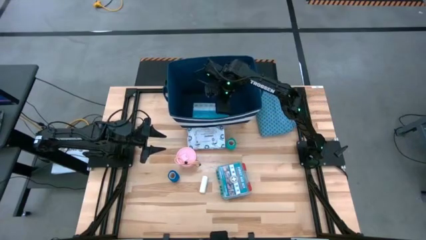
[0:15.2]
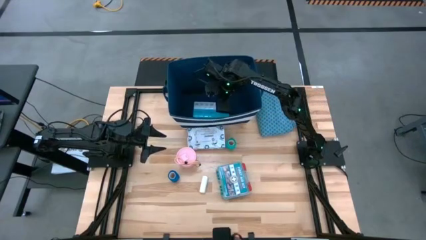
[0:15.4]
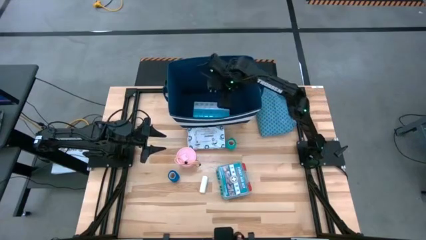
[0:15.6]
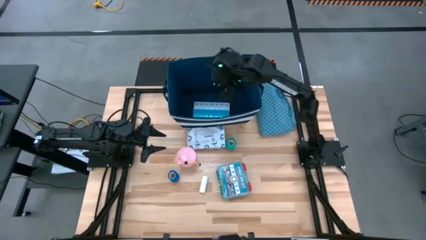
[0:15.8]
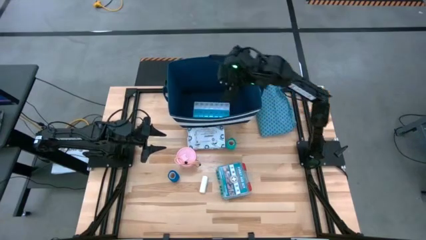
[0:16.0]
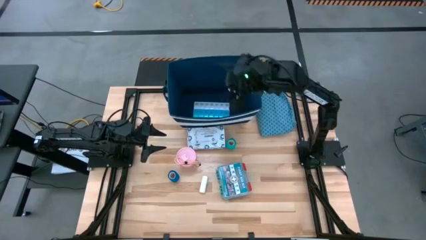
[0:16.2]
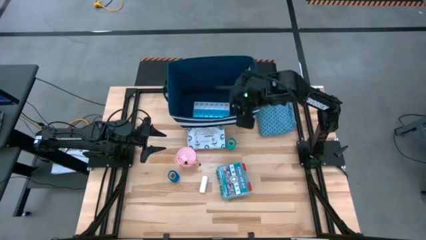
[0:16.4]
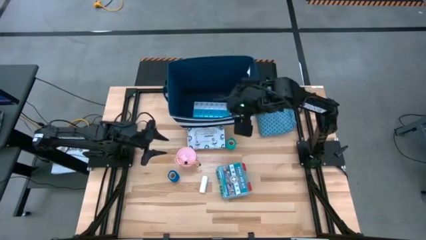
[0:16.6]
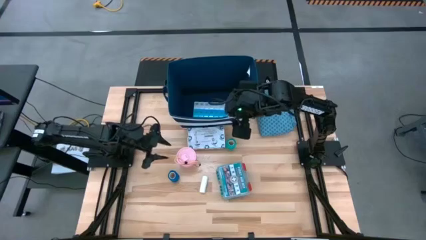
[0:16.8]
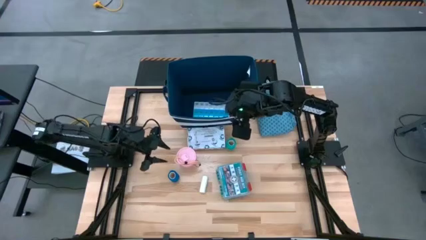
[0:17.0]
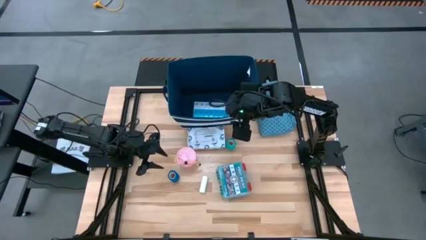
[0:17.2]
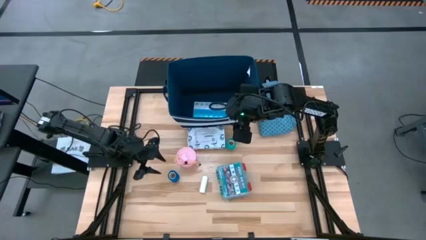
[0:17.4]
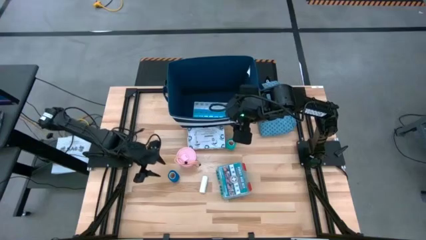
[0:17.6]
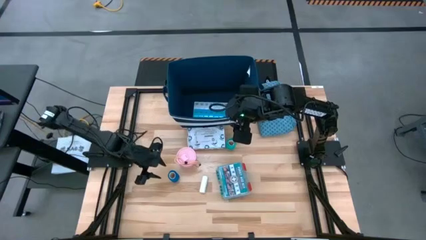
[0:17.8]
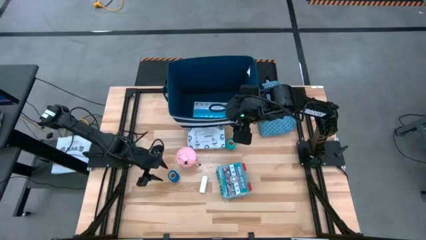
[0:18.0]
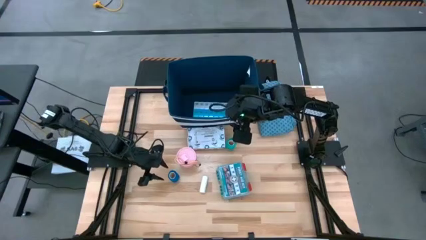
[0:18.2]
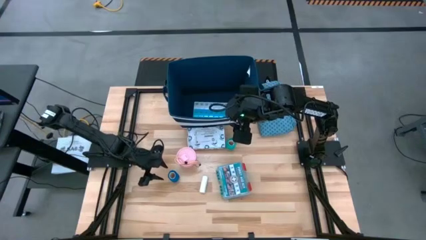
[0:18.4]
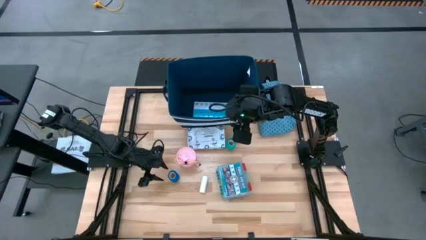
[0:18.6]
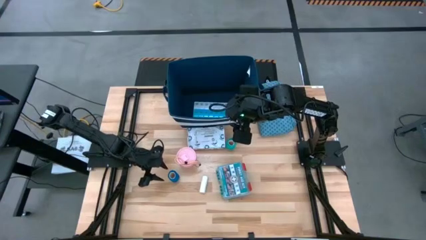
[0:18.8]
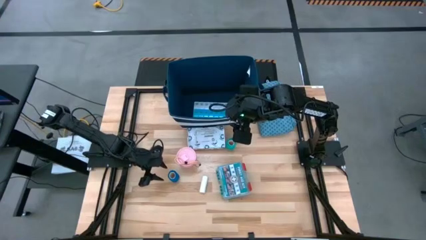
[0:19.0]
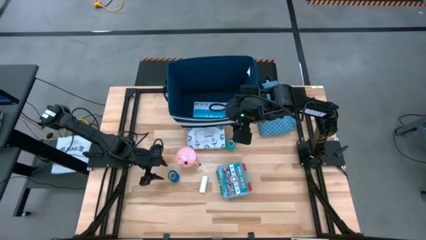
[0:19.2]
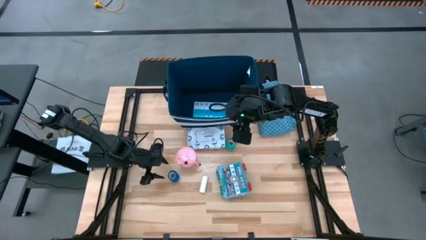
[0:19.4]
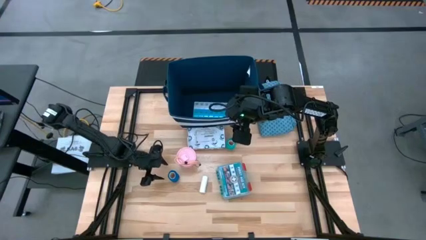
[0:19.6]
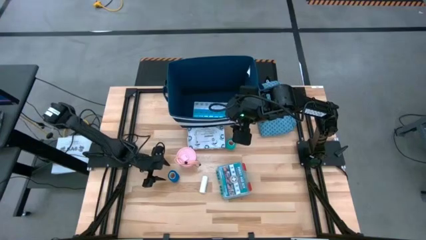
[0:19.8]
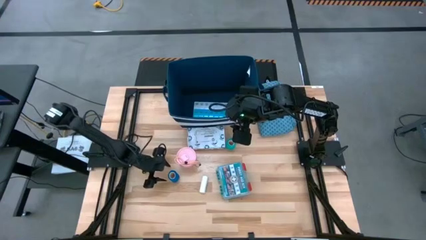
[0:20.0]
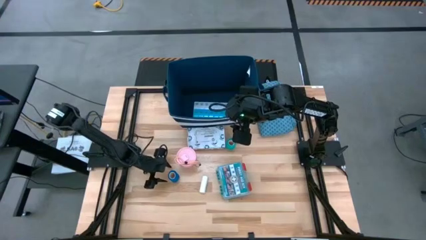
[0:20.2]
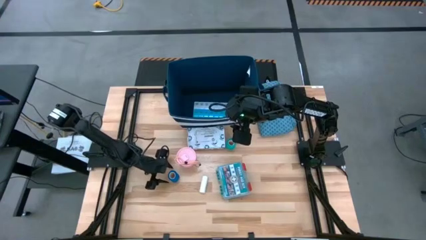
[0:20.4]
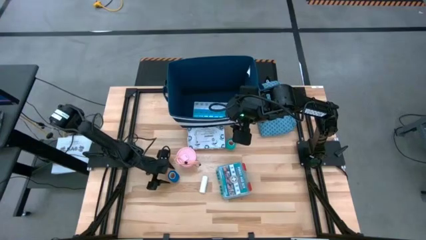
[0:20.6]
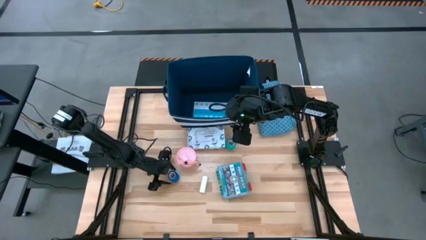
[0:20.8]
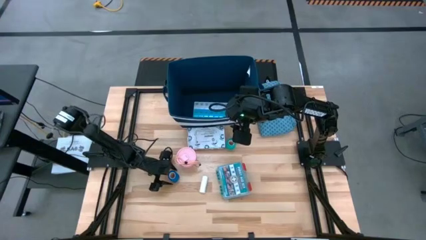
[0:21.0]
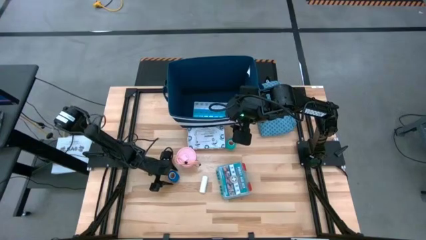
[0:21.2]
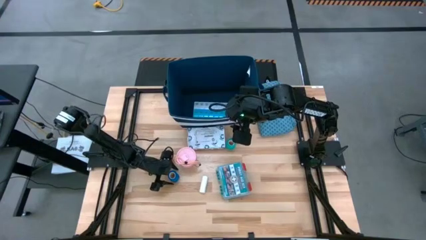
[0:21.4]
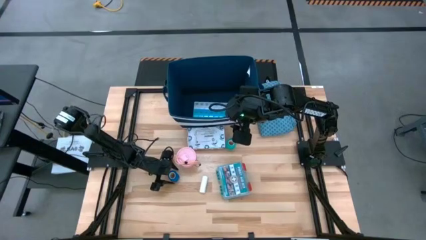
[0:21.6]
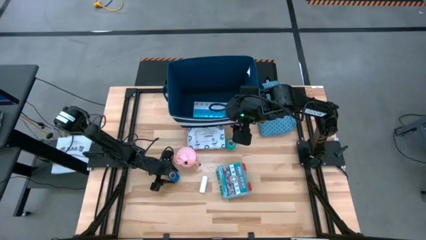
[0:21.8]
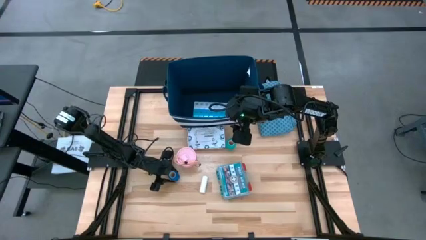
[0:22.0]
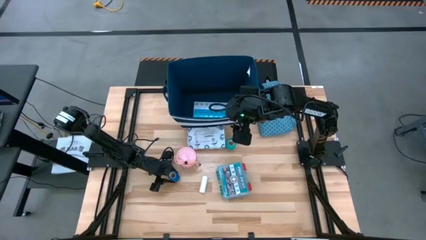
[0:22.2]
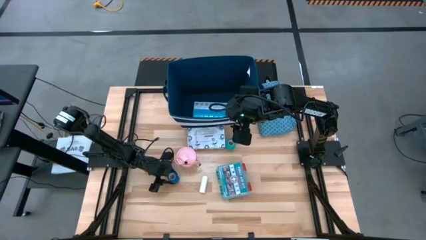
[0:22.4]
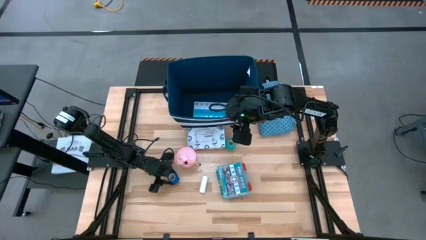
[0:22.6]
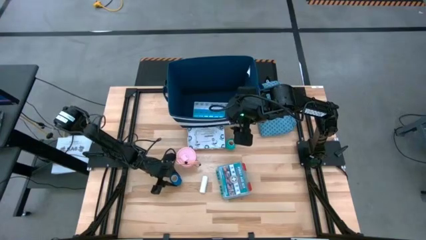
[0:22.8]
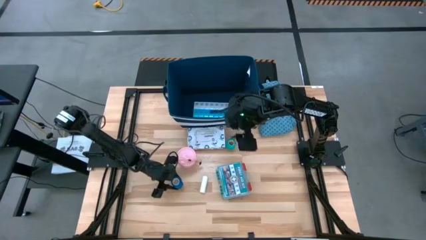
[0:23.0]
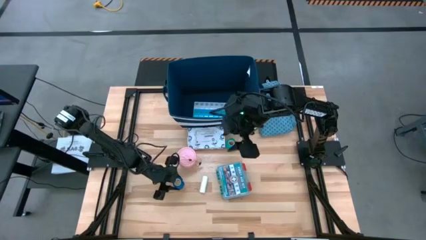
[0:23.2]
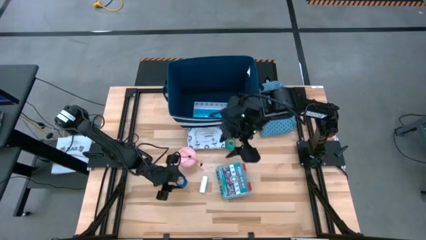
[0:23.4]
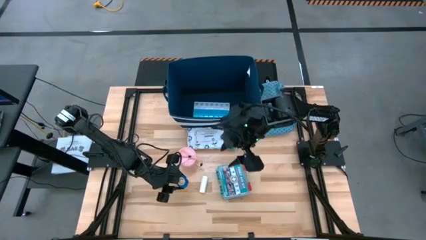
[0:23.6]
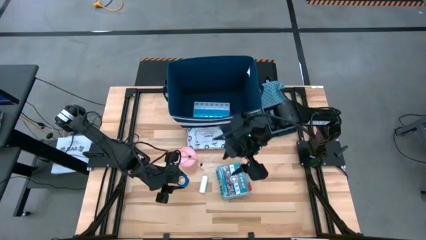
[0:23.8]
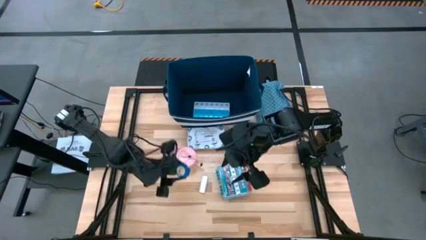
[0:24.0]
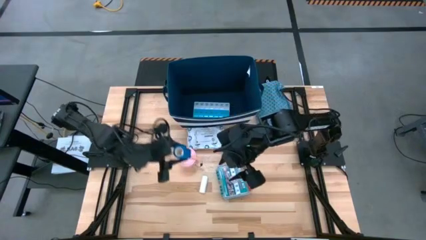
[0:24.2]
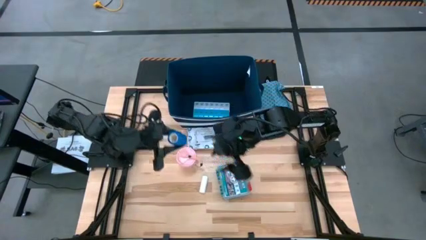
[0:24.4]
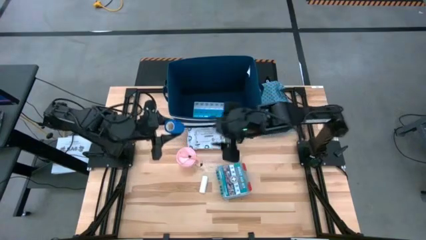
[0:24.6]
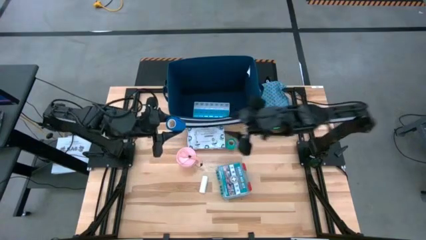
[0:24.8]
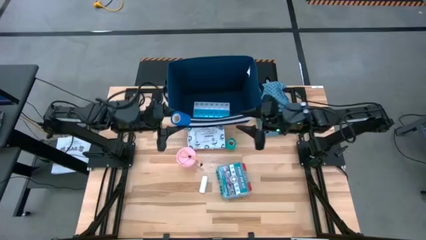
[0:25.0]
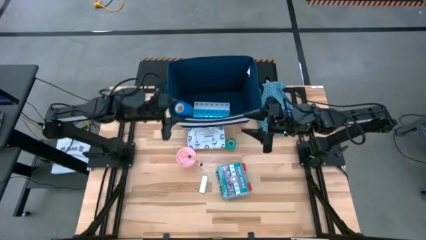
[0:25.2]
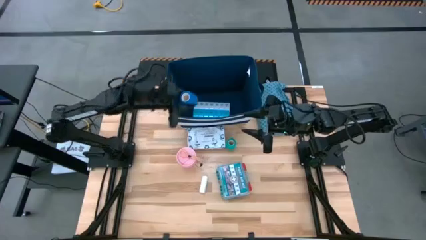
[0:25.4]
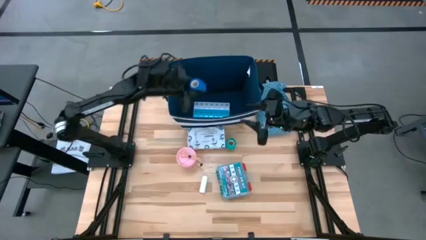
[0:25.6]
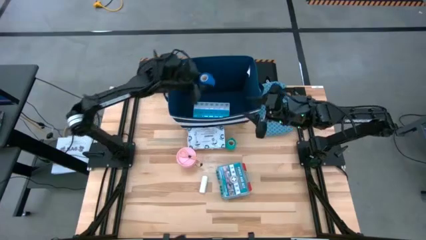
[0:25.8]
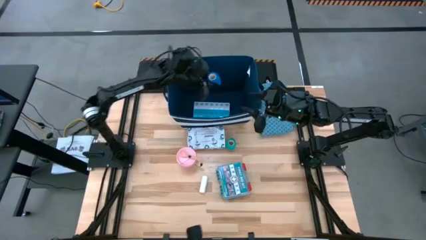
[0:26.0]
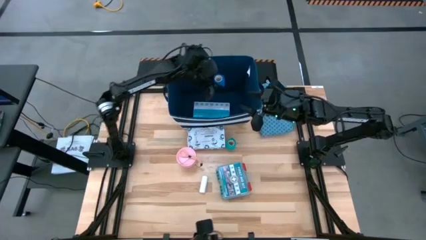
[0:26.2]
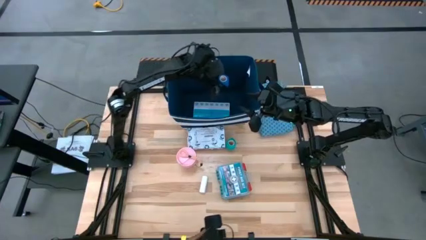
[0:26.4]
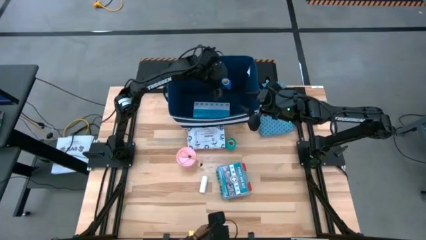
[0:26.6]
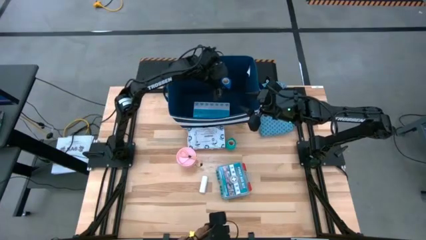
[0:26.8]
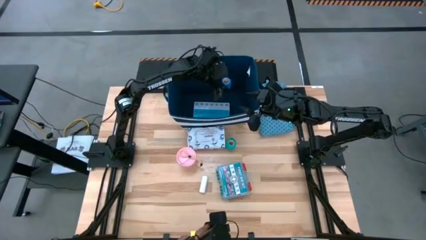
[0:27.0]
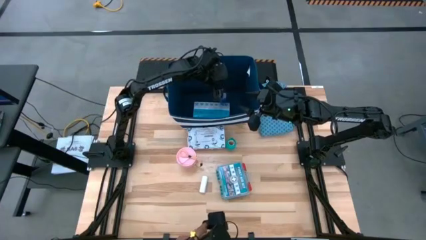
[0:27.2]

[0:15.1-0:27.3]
Task: Pick & place medical supplies in basket/bin
Put the blue bandage into the blue bin
